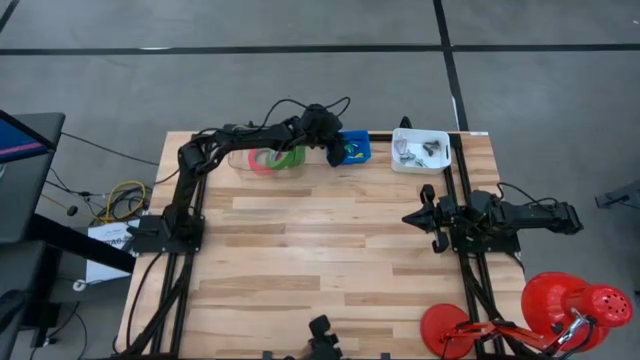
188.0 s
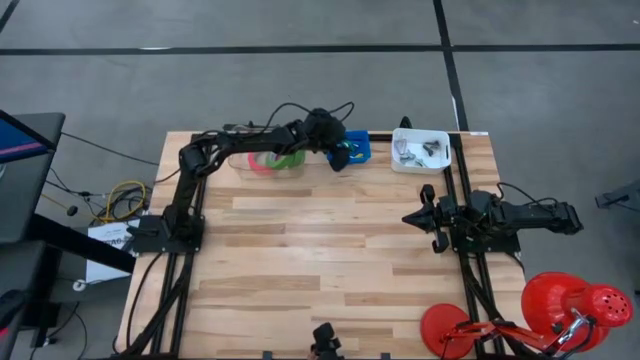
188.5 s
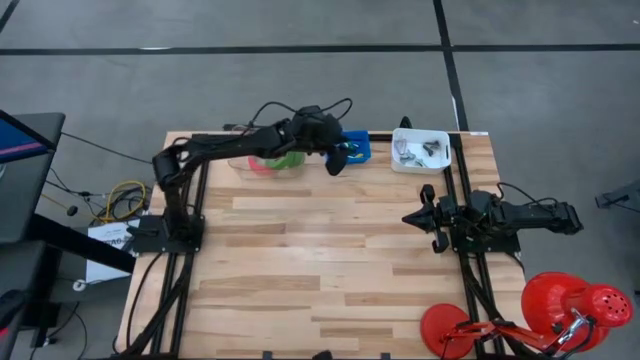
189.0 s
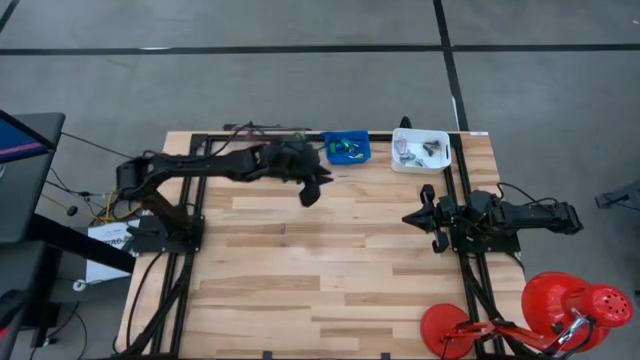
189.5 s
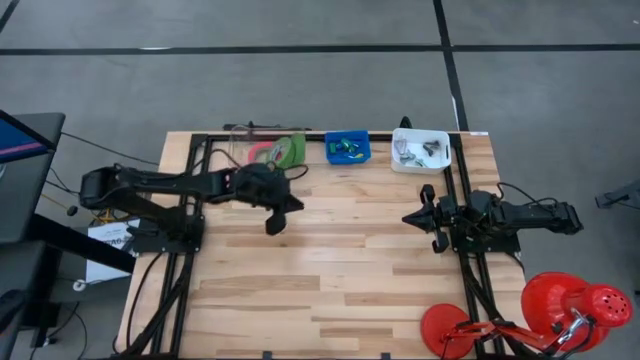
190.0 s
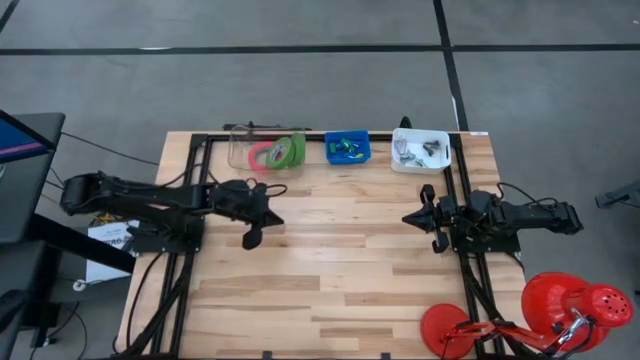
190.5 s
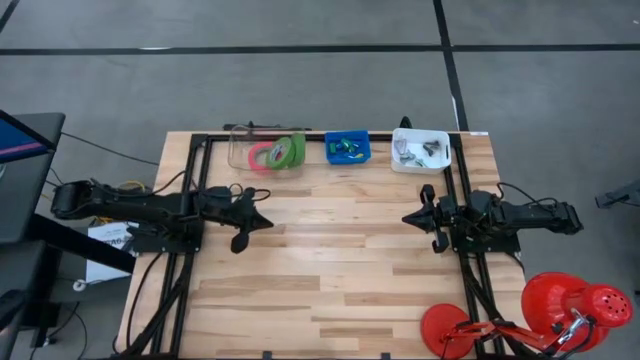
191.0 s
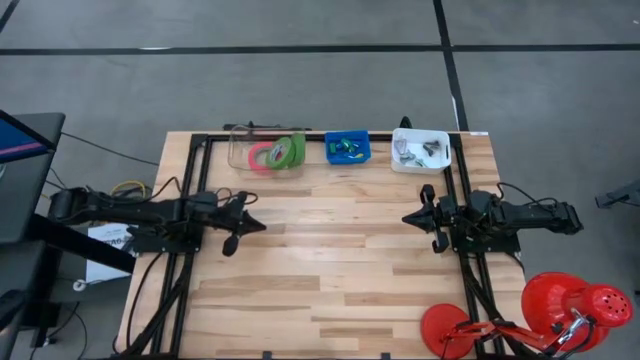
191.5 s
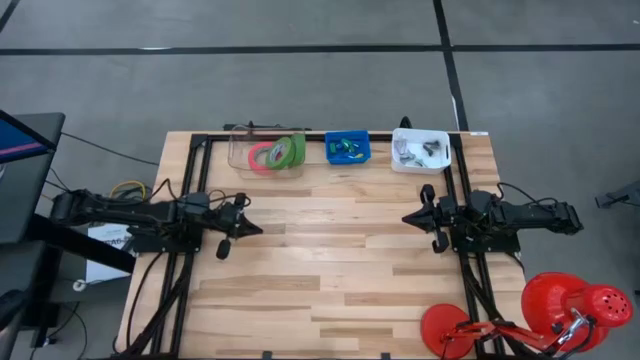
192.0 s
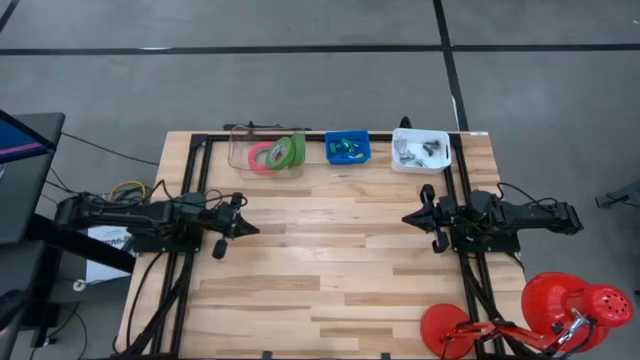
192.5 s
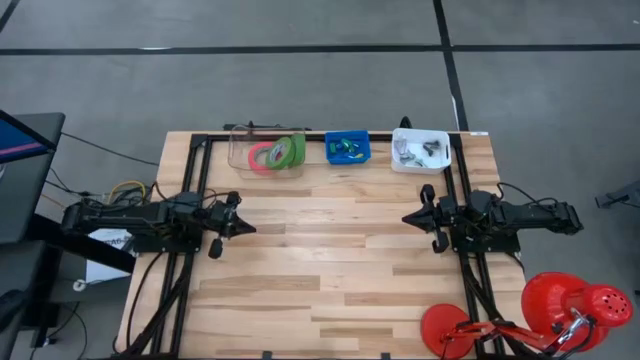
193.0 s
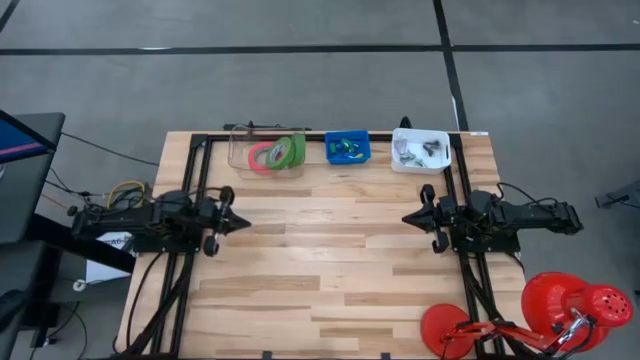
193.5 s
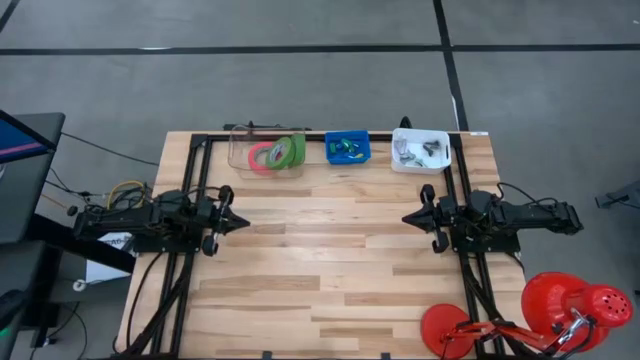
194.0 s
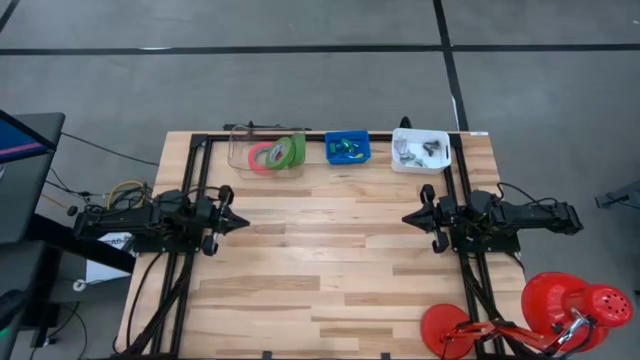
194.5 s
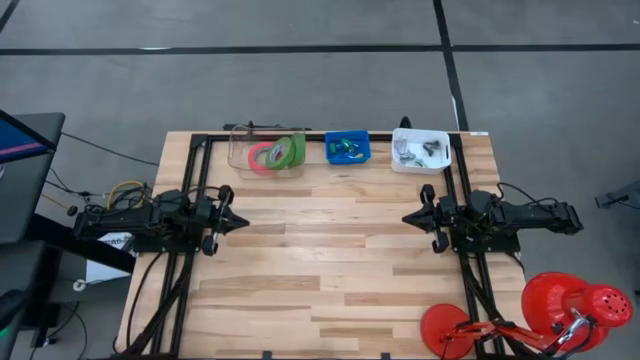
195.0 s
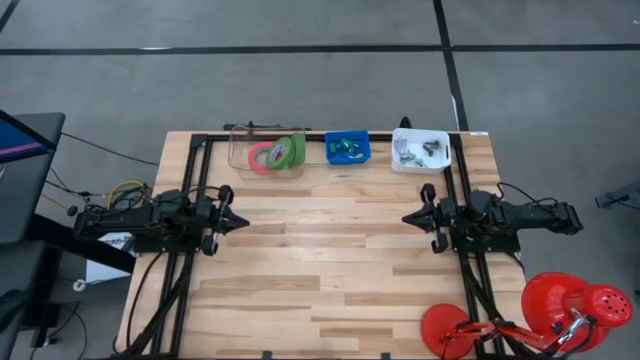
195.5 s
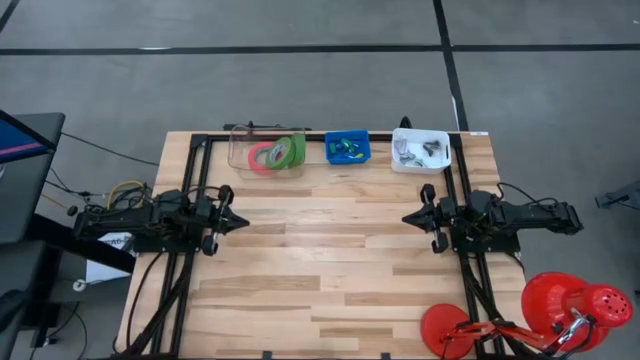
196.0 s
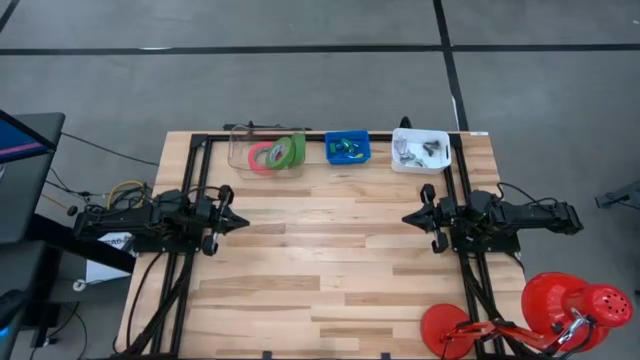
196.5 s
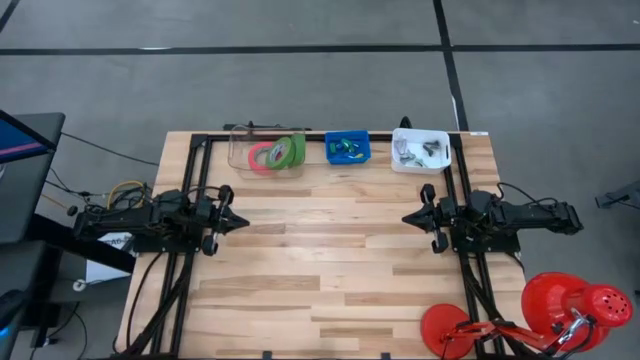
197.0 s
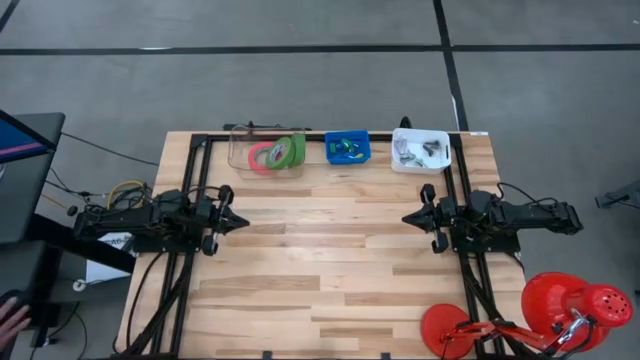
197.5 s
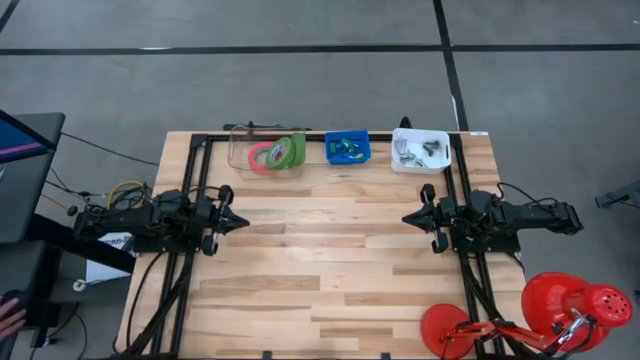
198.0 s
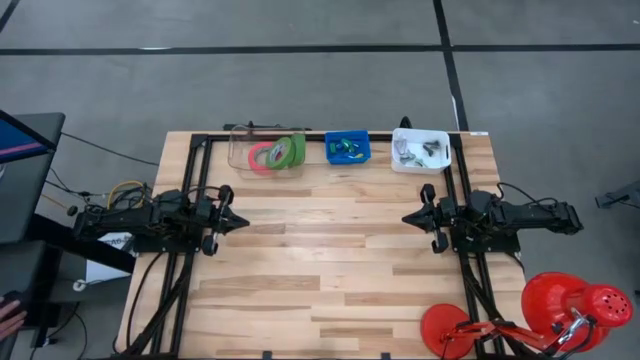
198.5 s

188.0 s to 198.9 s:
Task: Pick and place Stapler, Stapler remover, tape
Return to Home Position

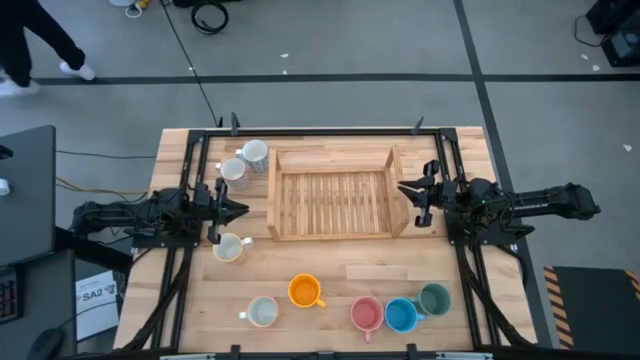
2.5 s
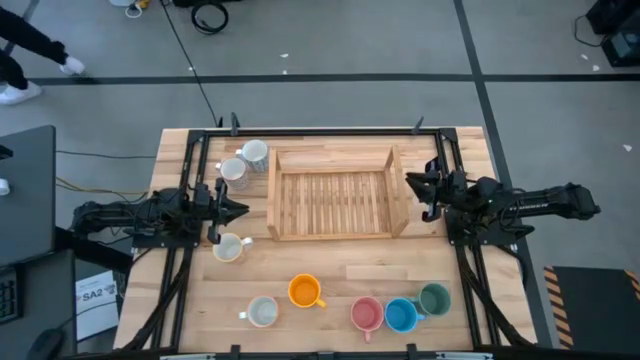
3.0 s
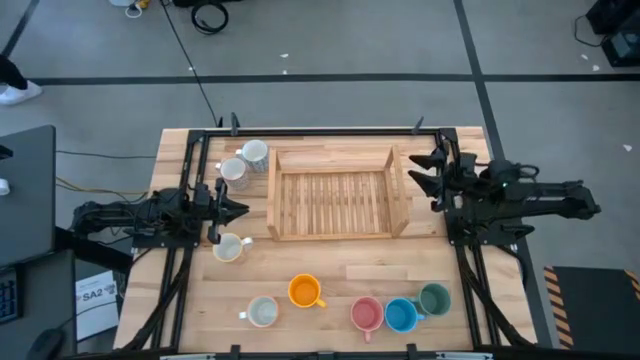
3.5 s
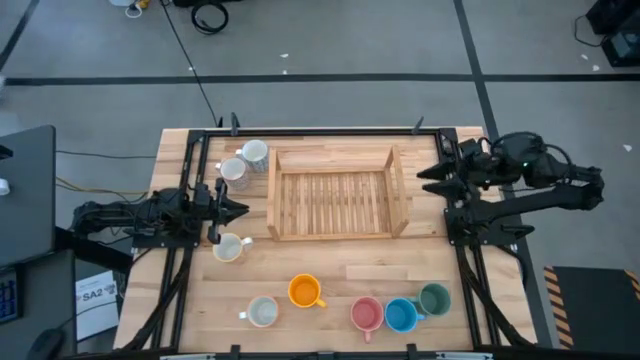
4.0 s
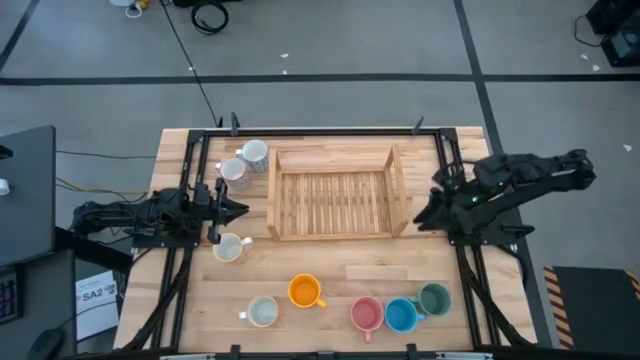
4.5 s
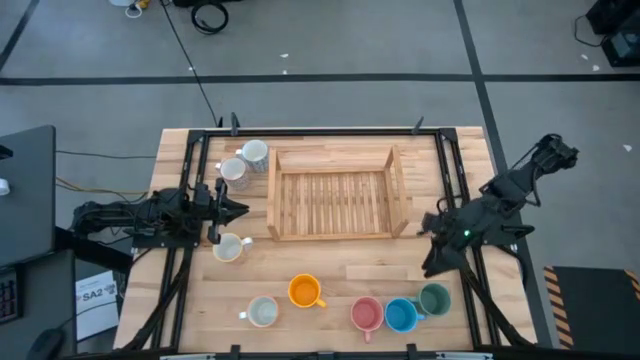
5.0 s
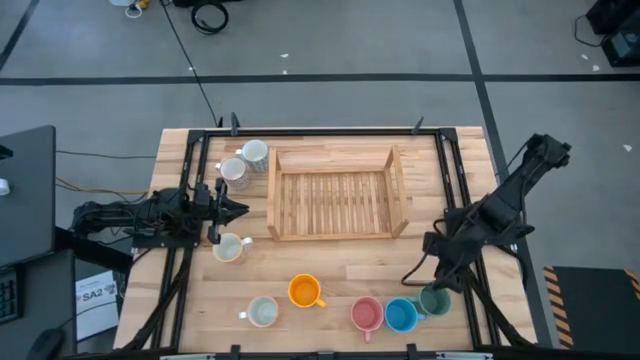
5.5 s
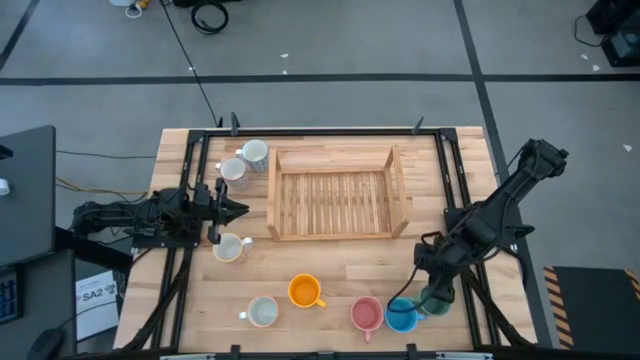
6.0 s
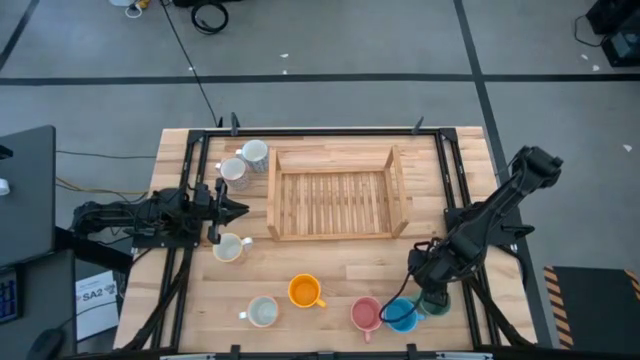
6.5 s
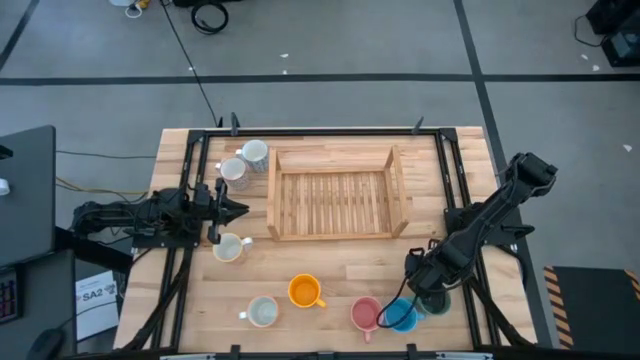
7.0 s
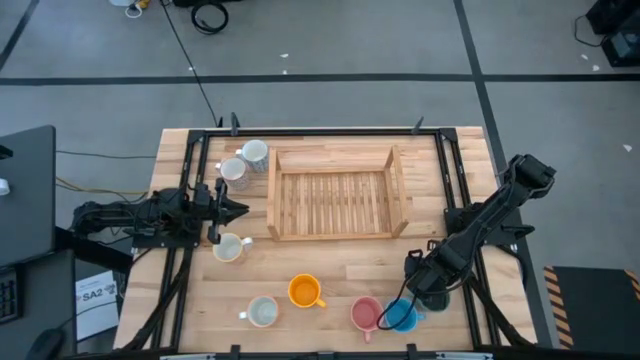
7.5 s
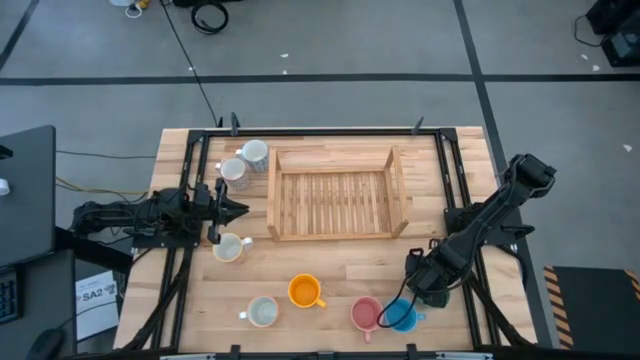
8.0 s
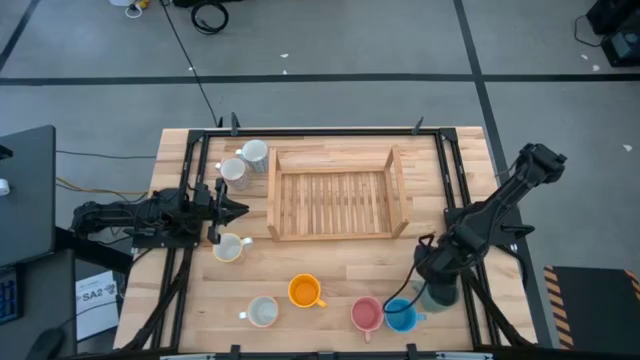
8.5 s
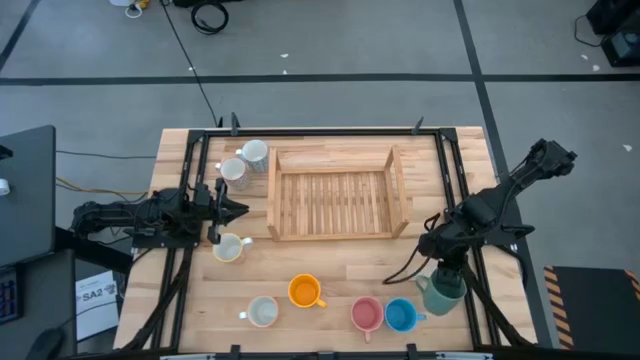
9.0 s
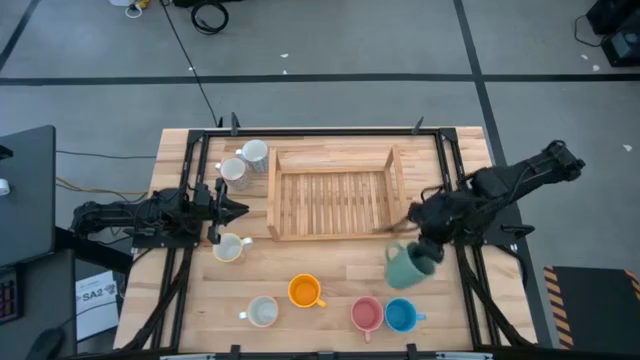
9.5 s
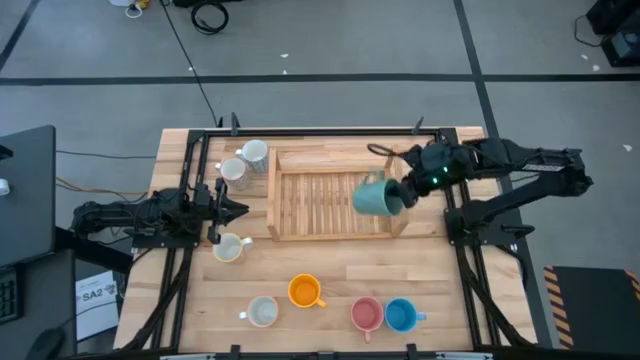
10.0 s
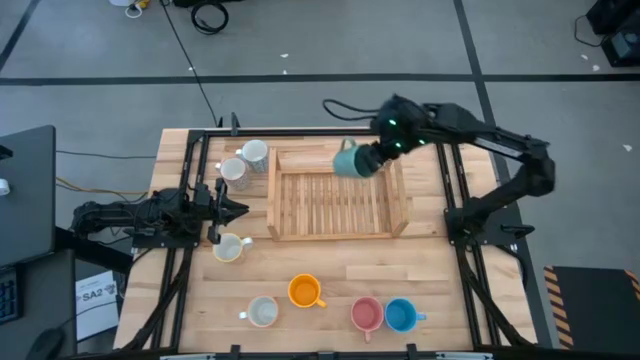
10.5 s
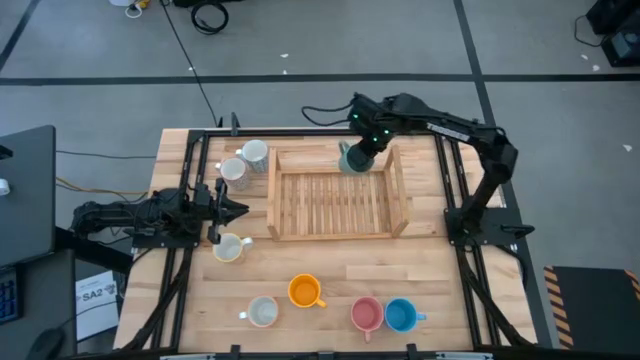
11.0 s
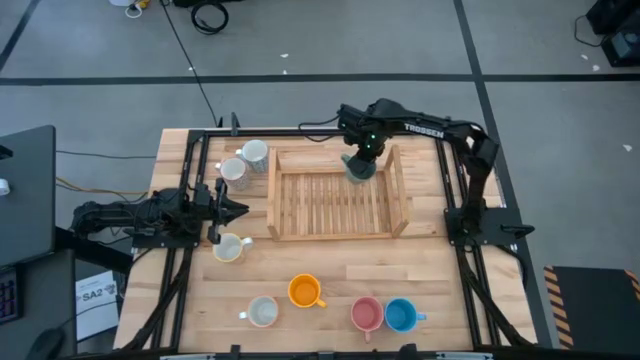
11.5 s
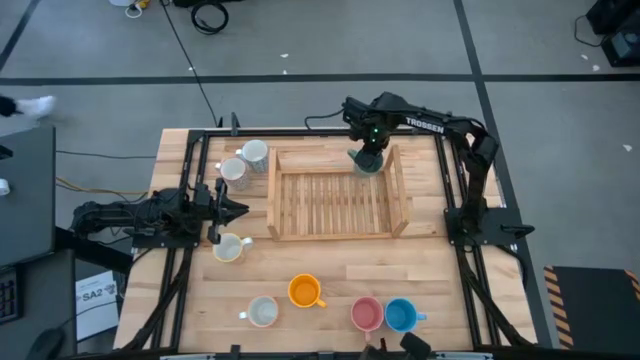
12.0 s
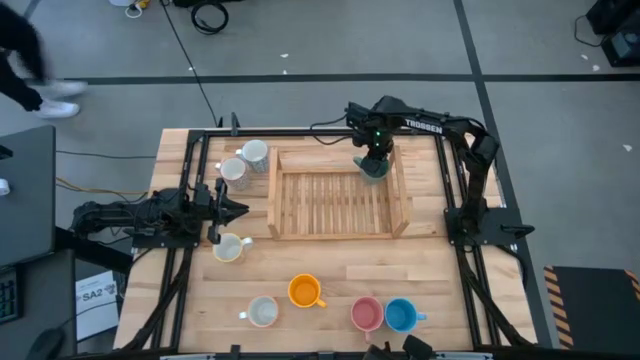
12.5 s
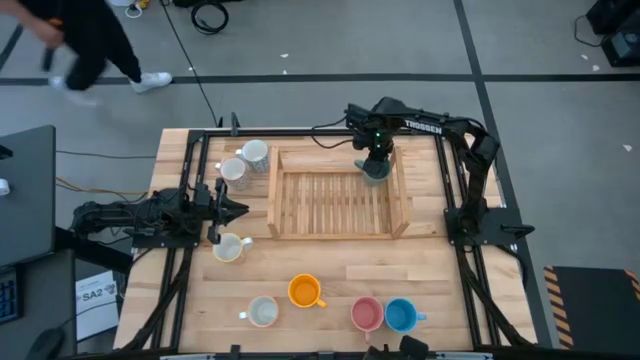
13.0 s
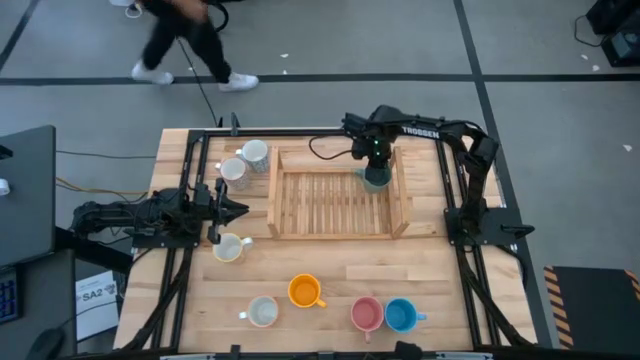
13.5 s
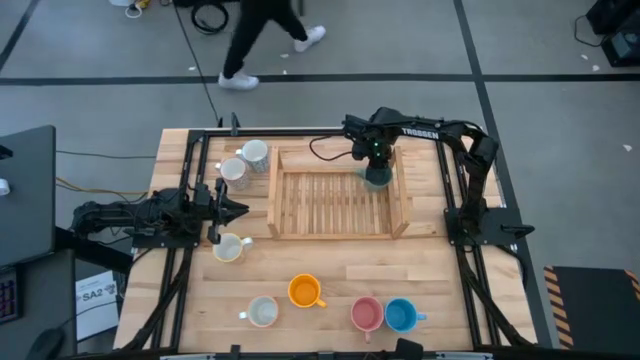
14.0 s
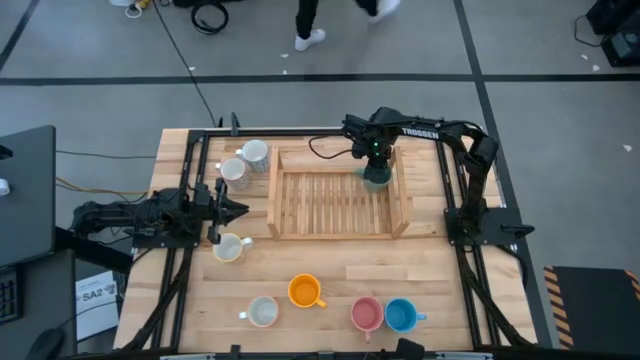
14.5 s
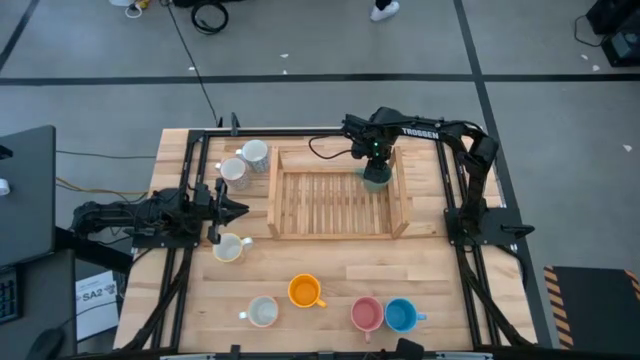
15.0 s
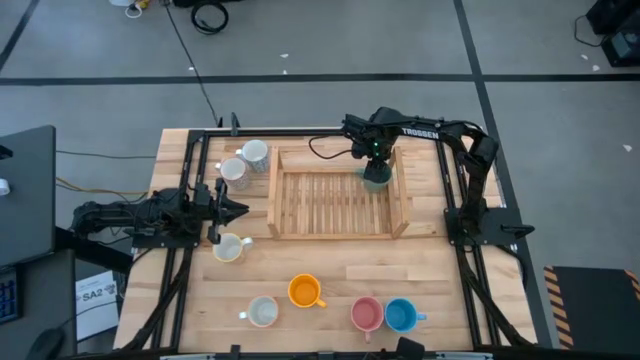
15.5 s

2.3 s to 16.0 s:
Task: Place coffee mugs
Put the green cup on the shelf
